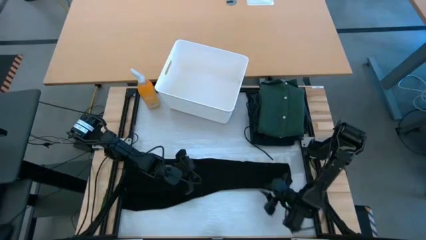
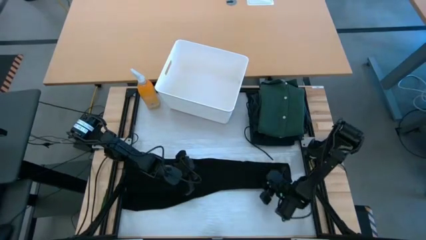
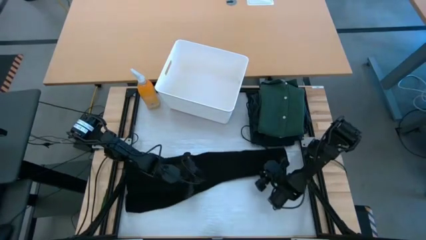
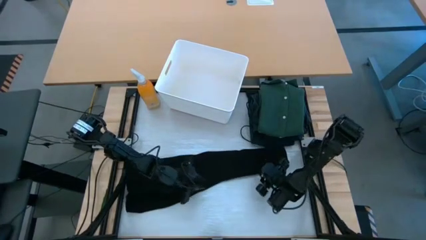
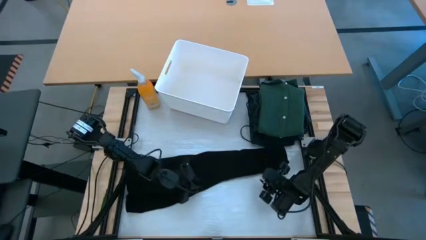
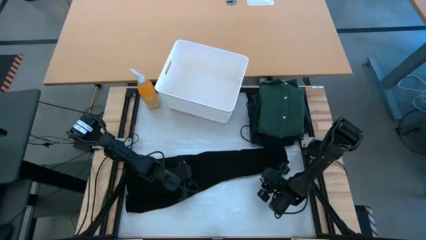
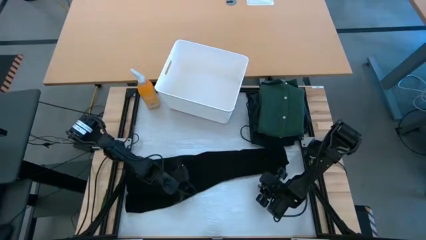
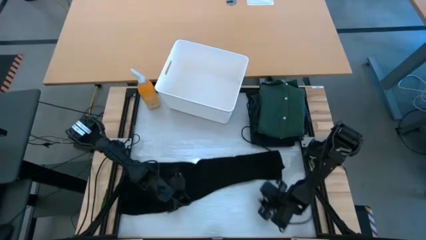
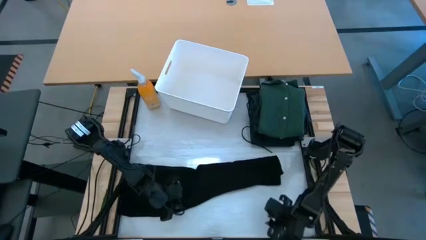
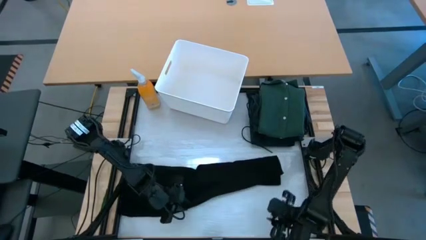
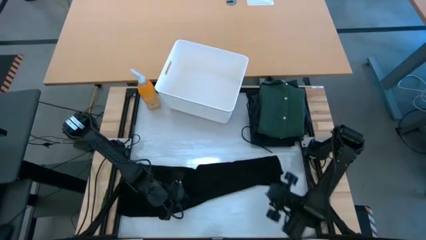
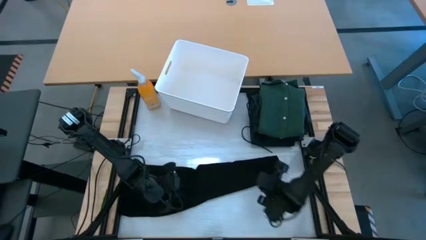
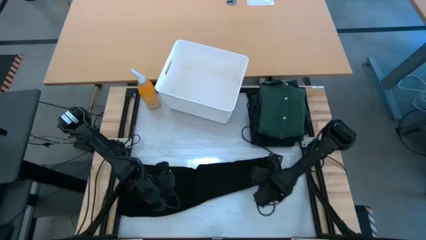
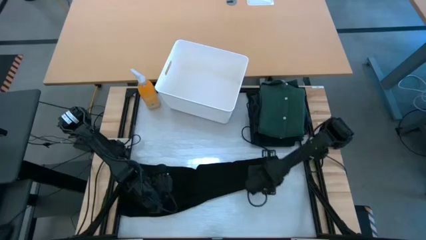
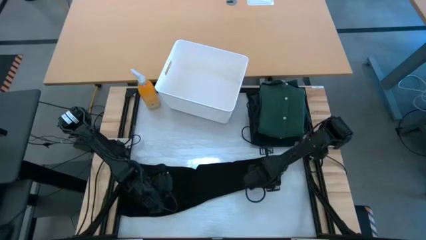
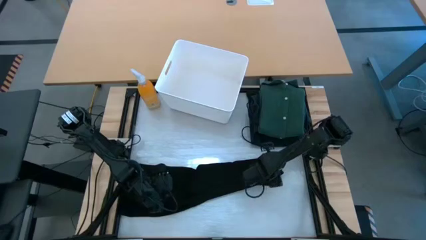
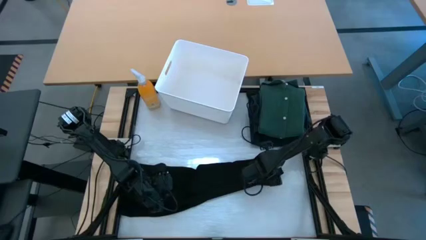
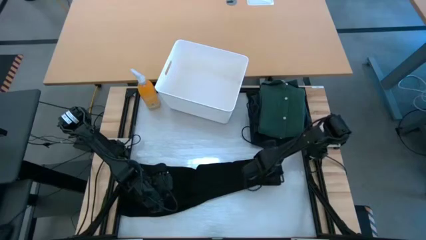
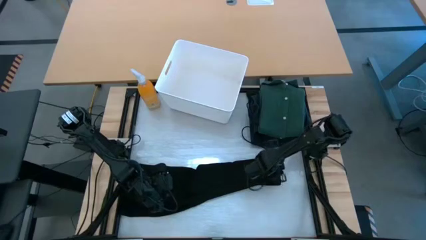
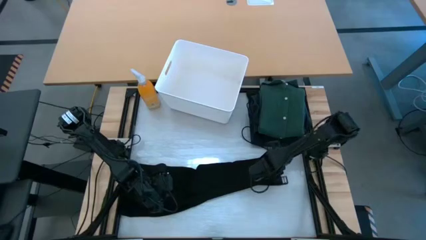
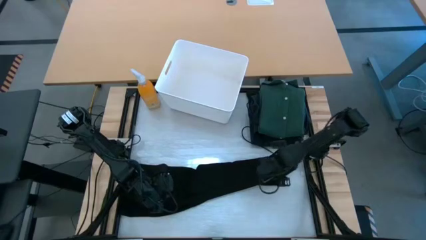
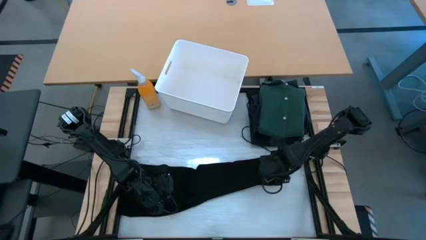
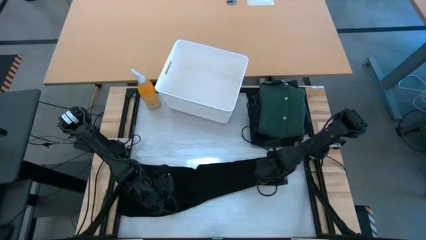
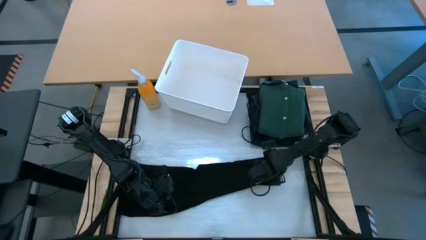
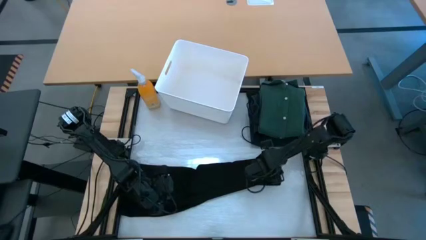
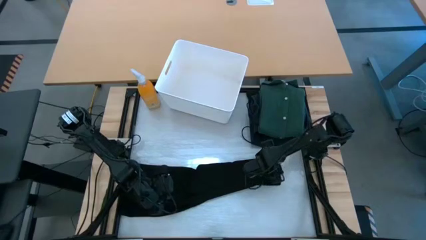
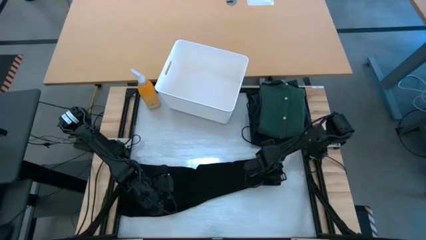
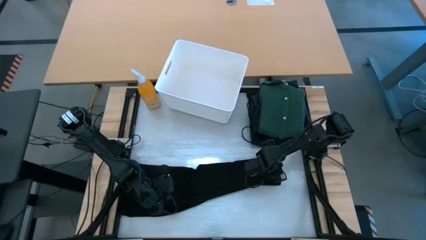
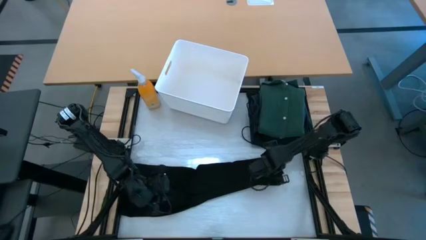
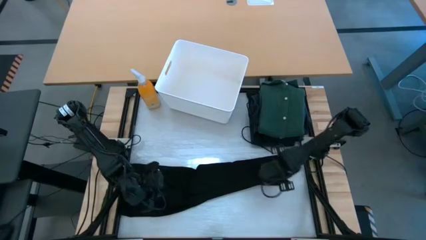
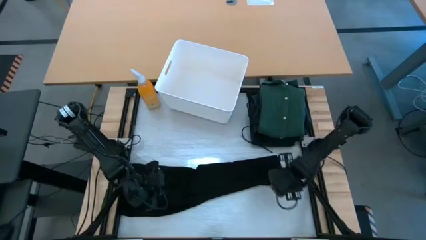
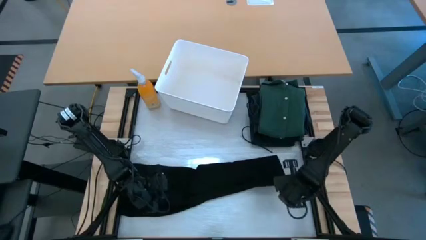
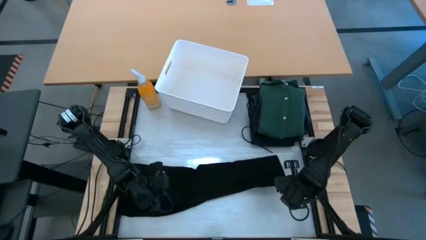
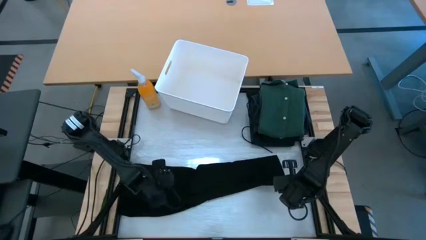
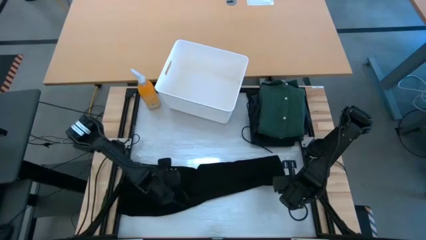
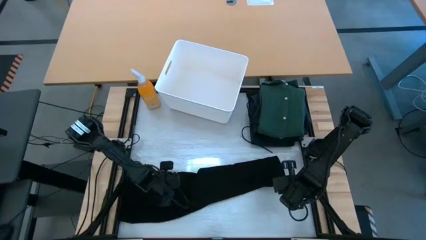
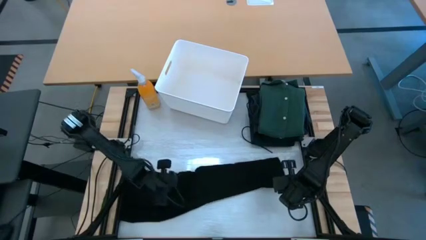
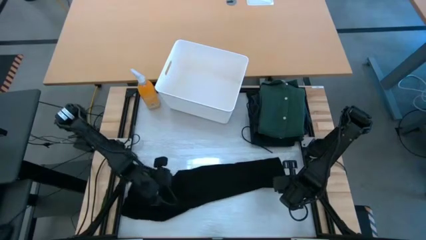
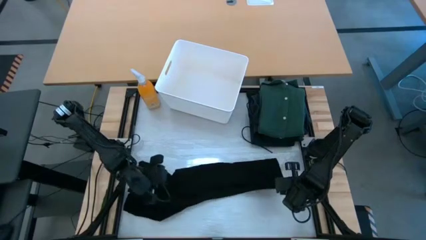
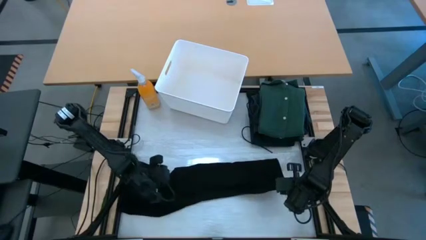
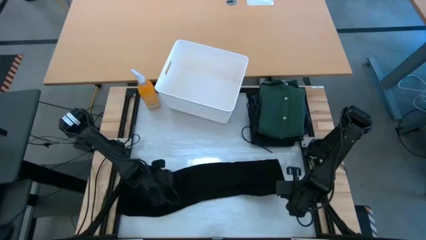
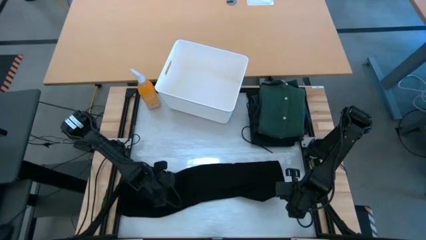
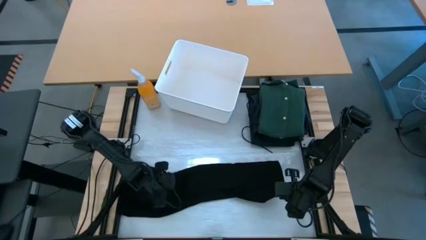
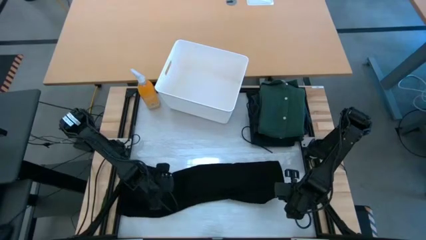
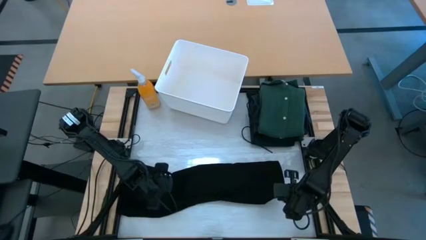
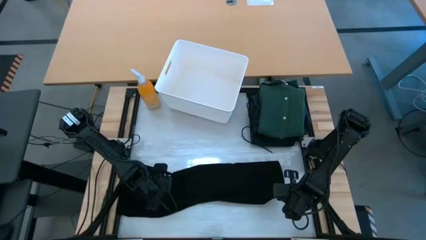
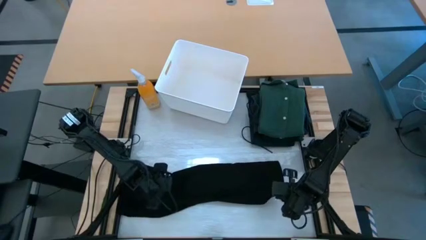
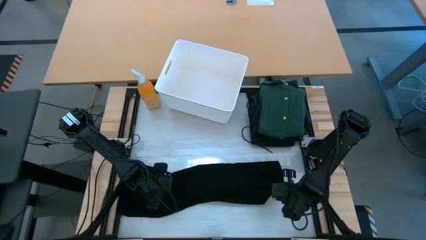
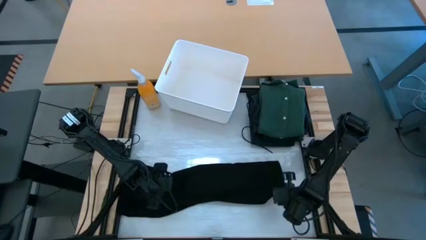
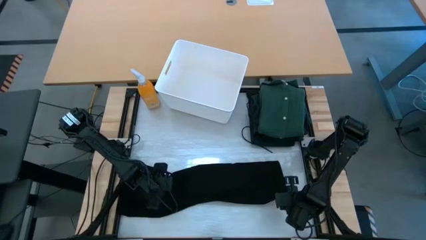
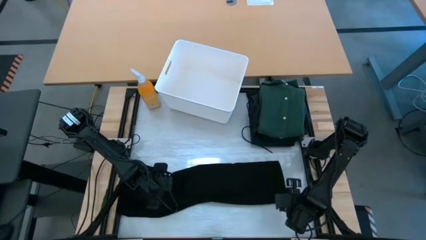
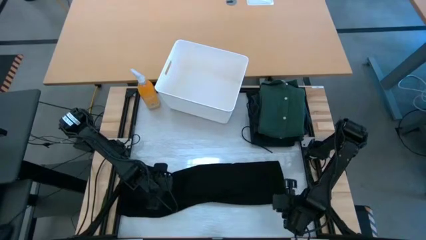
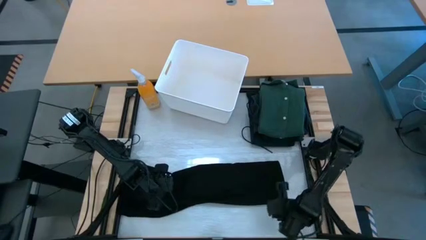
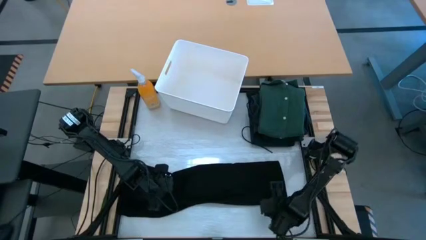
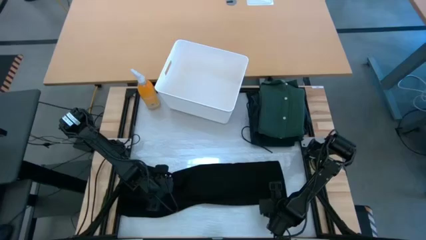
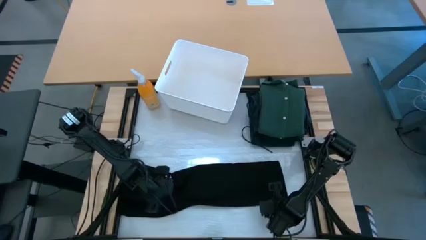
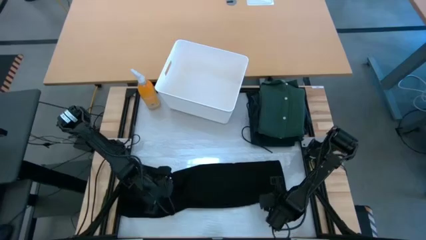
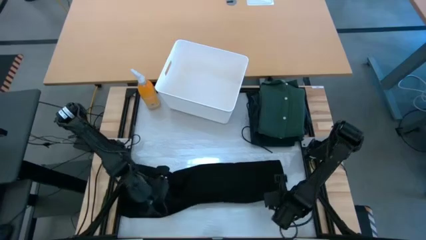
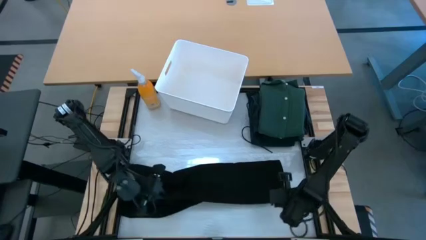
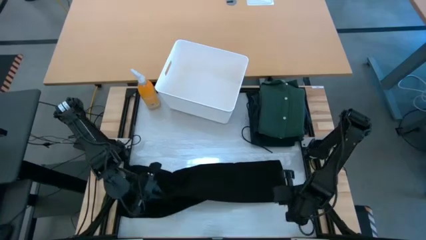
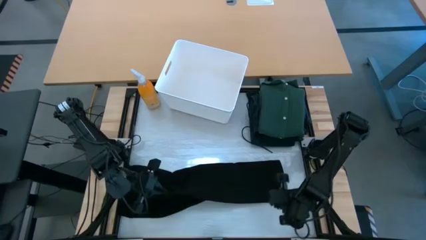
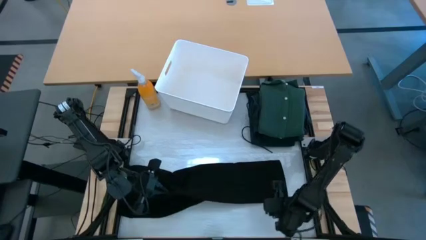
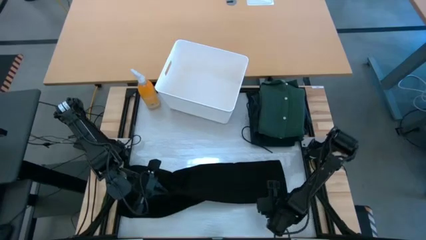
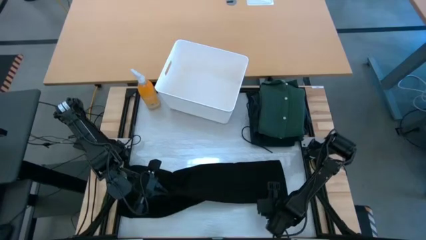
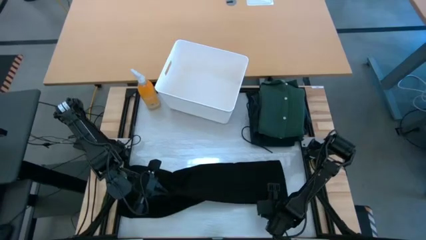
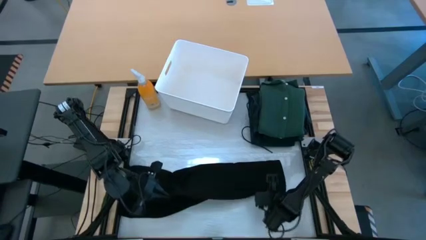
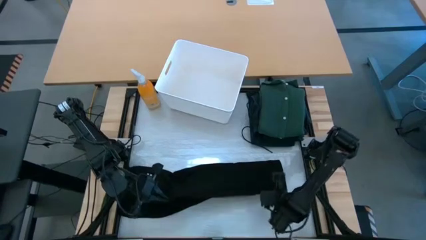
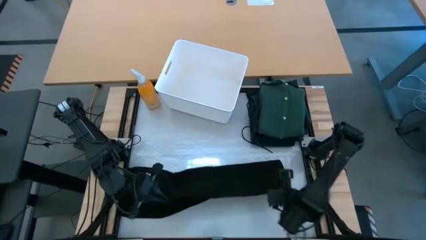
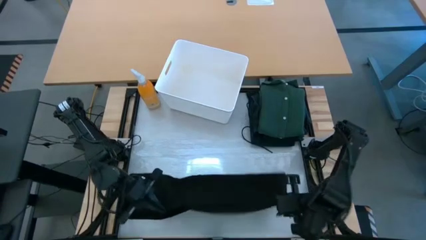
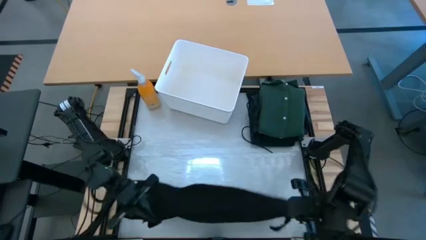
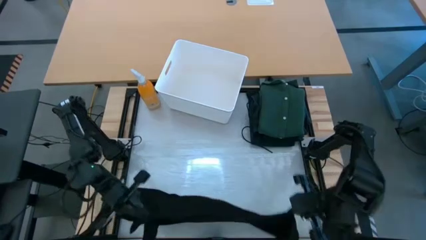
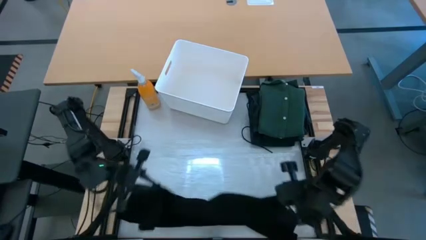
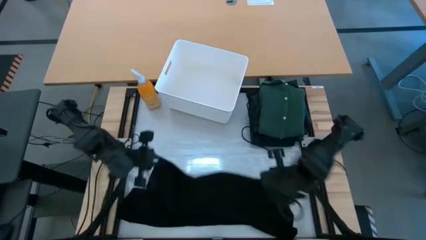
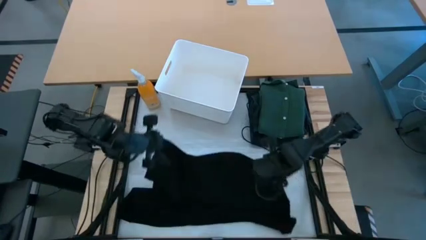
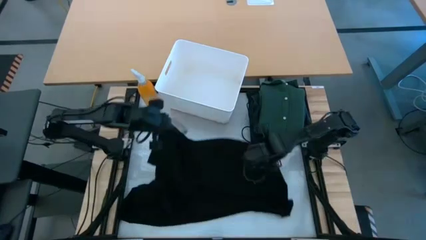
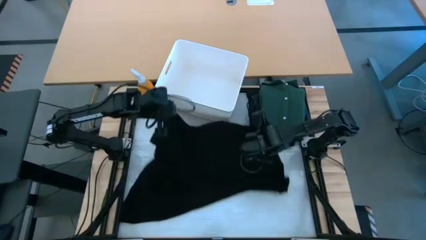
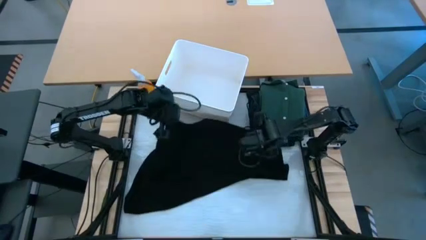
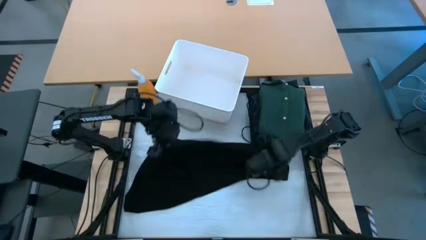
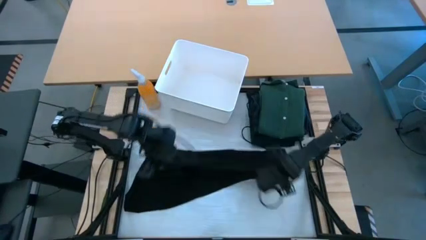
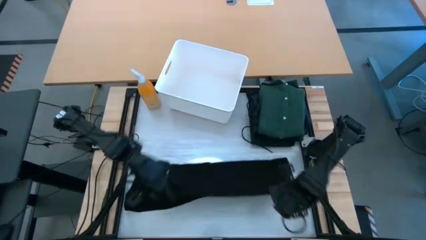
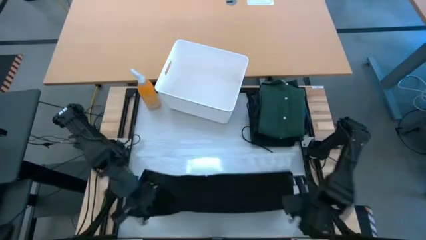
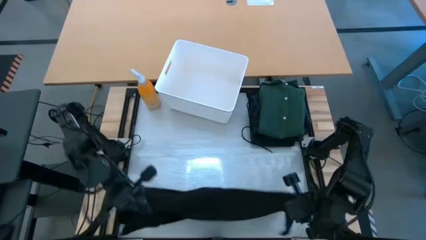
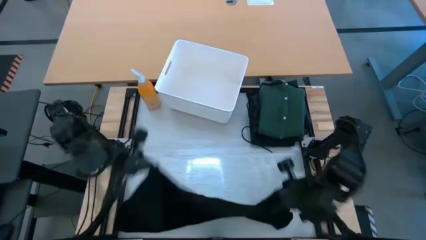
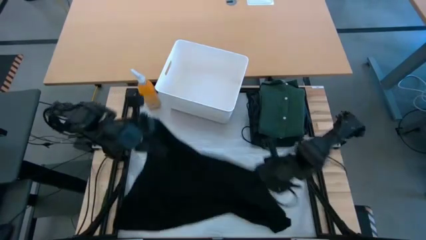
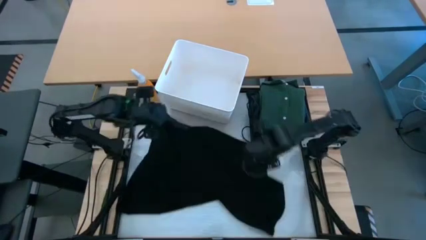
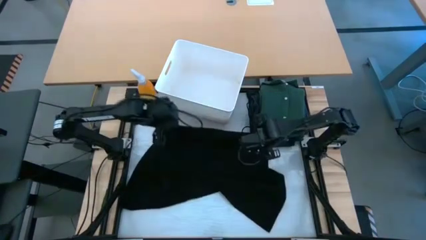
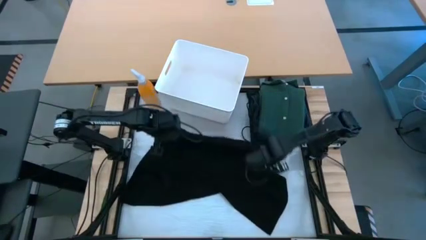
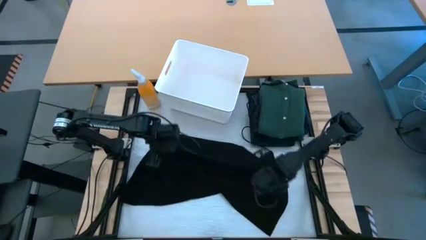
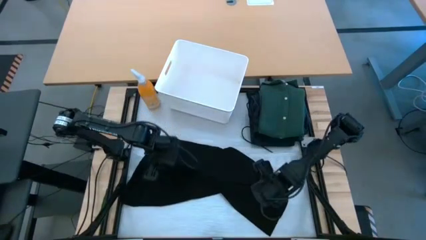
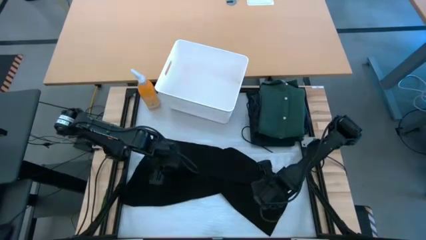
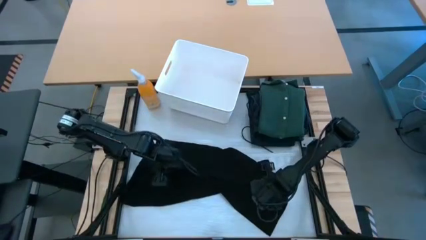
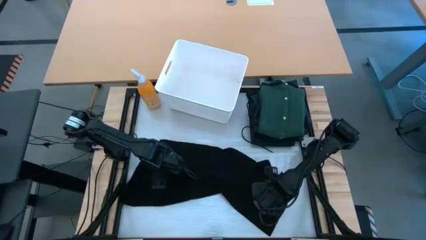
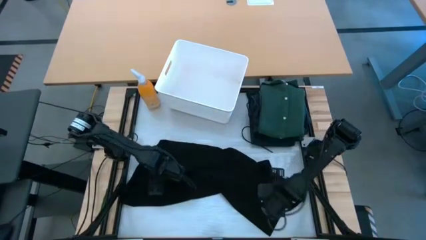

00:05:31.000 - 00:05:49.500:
Task: Fold laundry
Fold the black shirt
